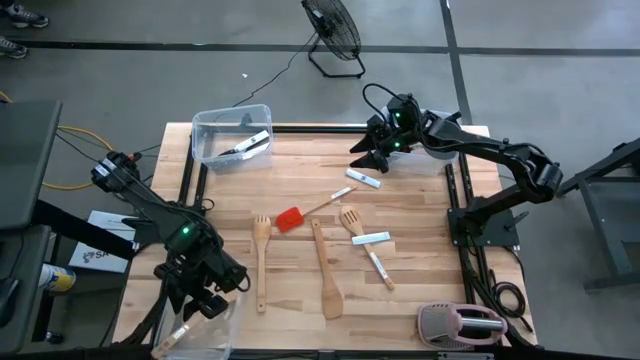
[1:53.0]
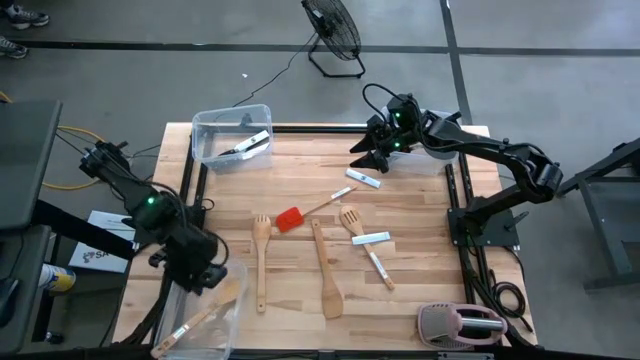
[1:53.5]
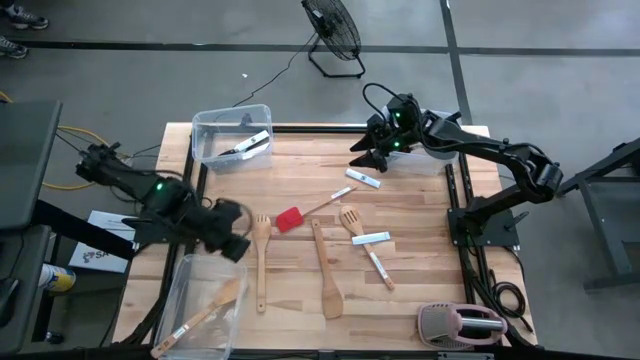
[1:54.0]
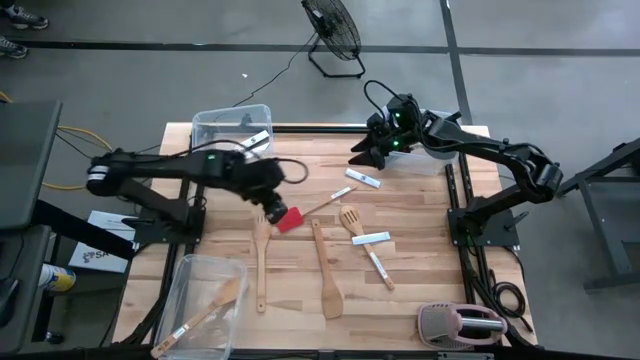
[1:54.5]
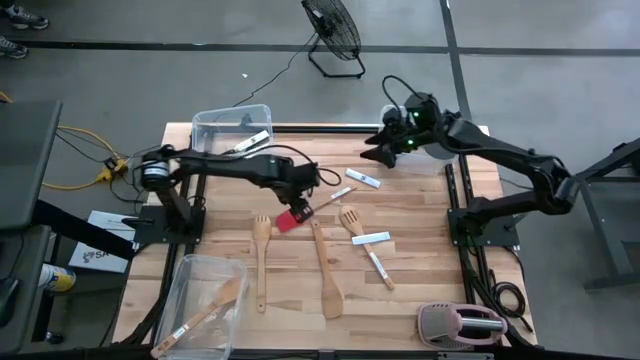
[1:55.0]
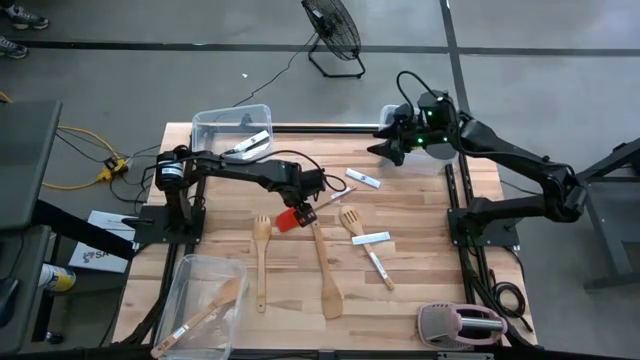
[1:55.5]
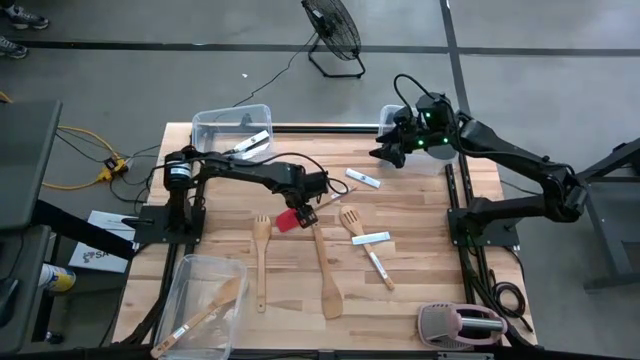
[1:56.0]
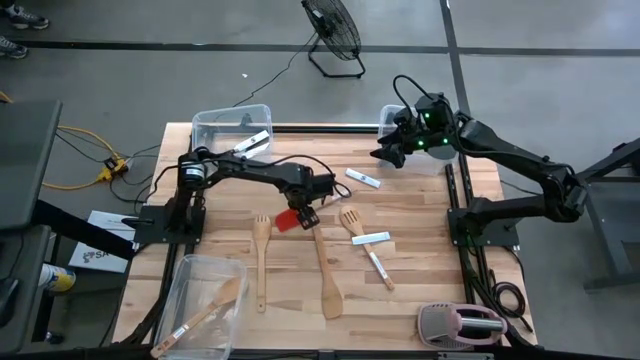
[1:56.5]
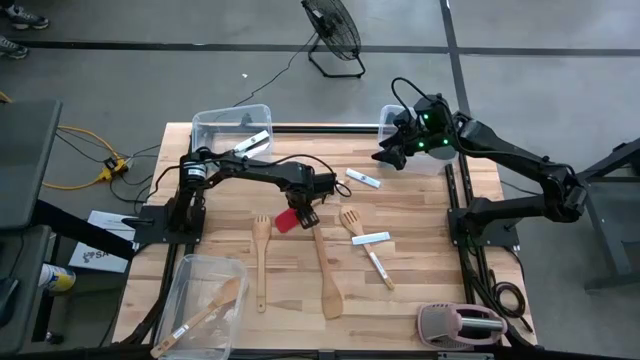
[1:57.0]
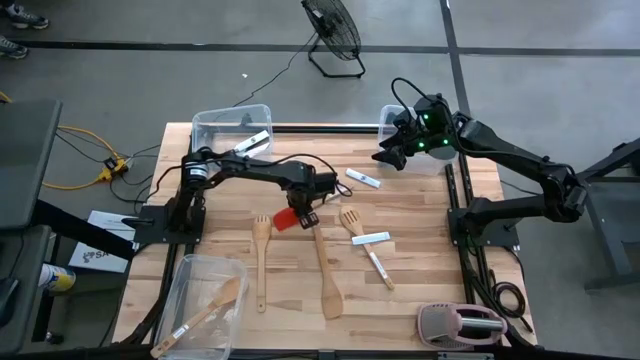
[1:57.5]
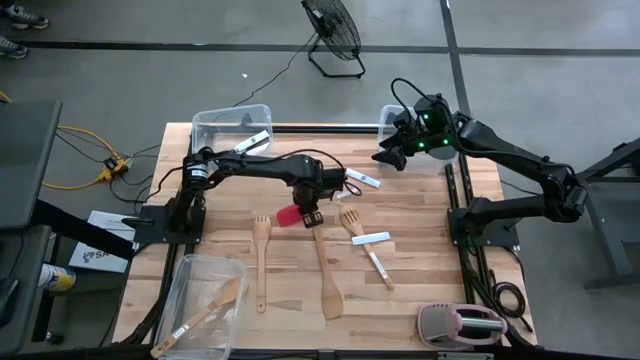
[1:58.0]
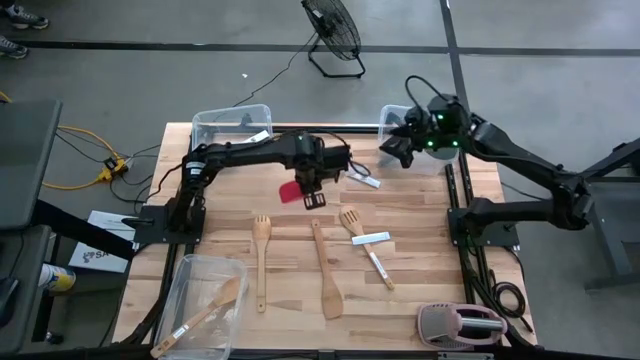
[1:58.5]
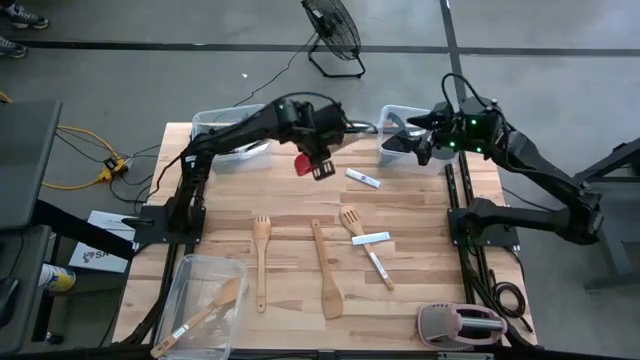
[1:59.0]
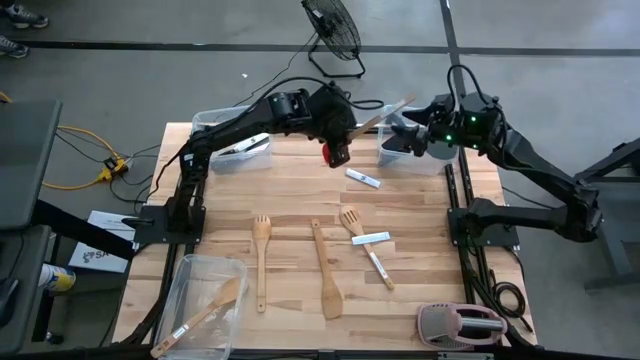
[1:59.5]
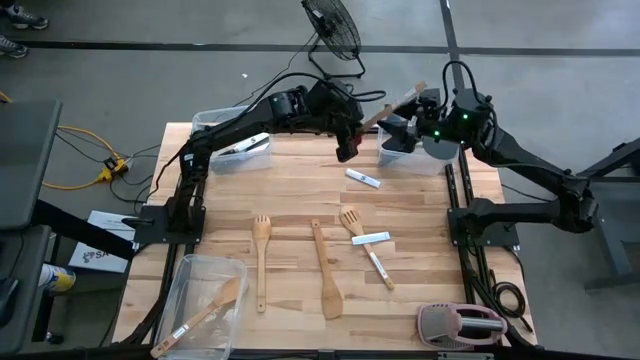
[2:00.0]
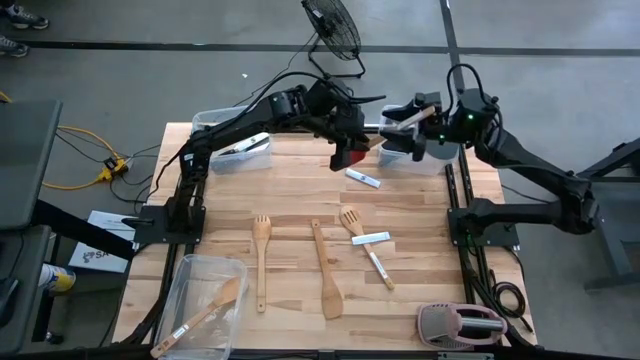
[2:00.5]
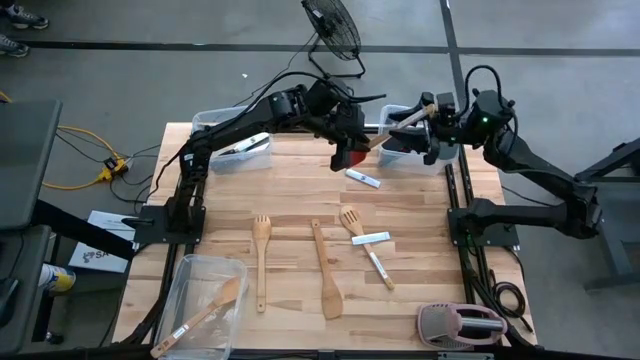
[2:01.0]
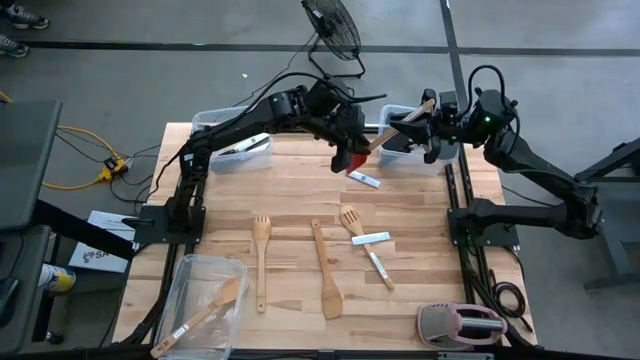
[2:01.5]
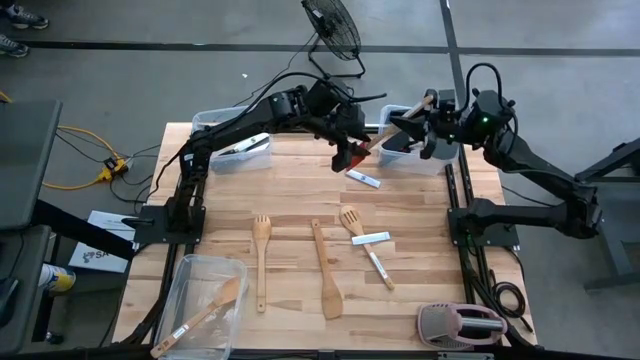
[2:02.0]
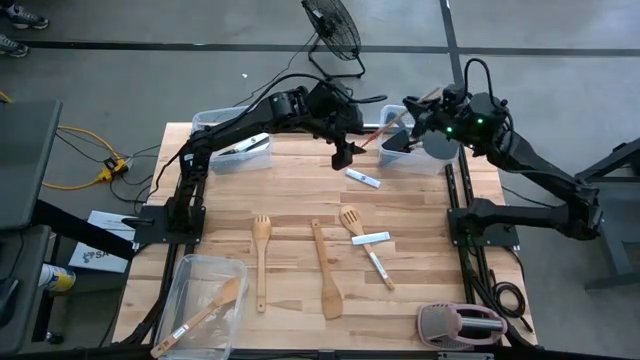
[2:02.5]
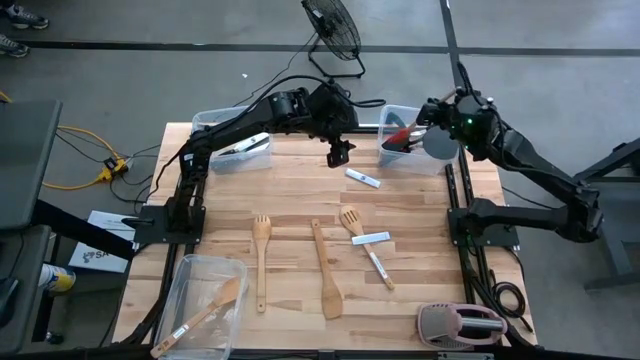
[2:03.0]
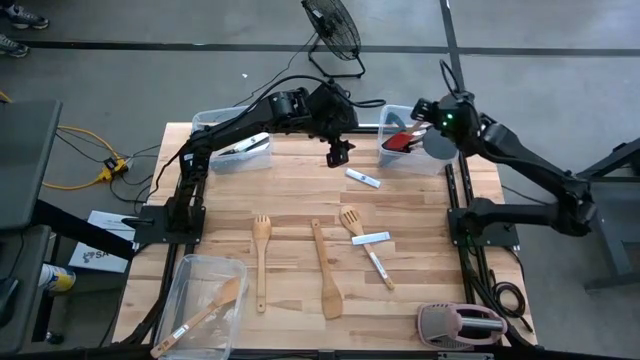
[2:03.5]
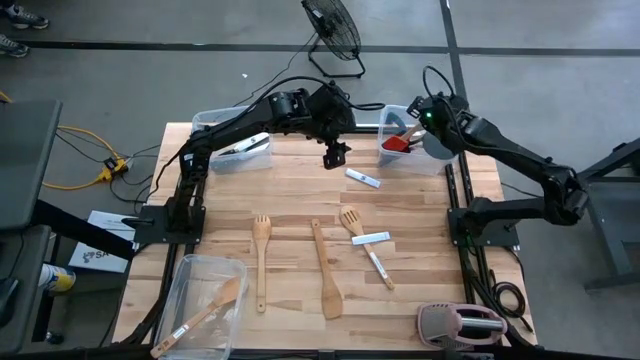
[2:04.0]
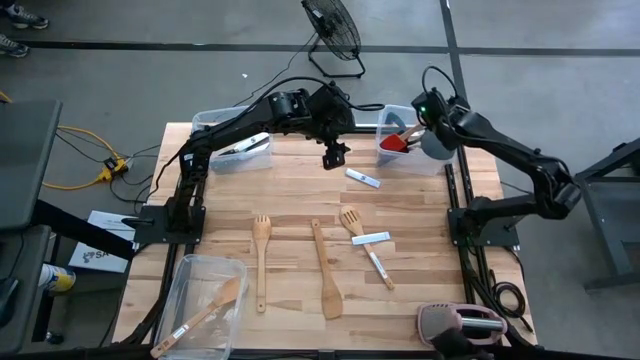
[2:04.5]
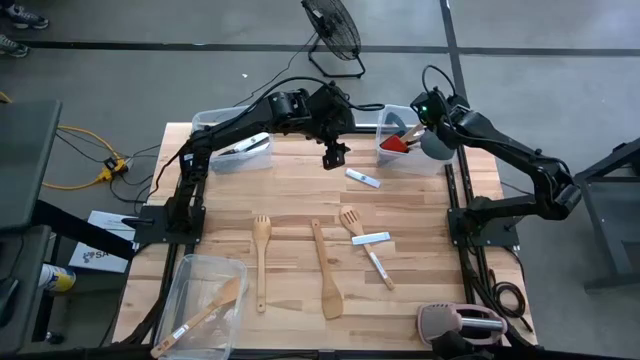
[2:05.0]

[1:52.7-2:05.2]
Task: Pick & Place Kitchen Items
Put the red spatula into the top right transparent bin

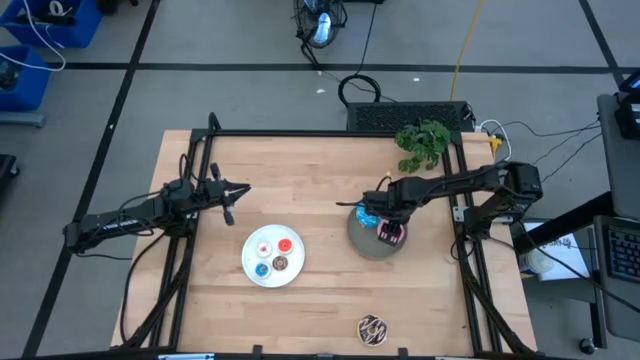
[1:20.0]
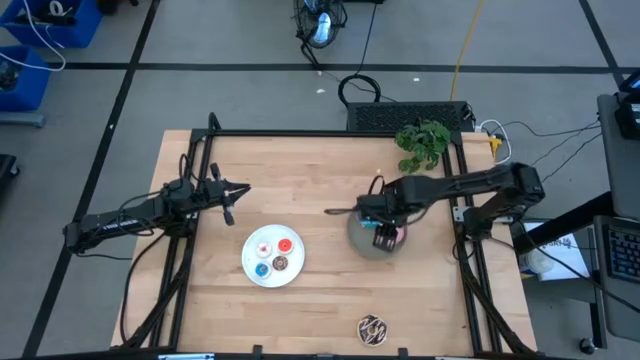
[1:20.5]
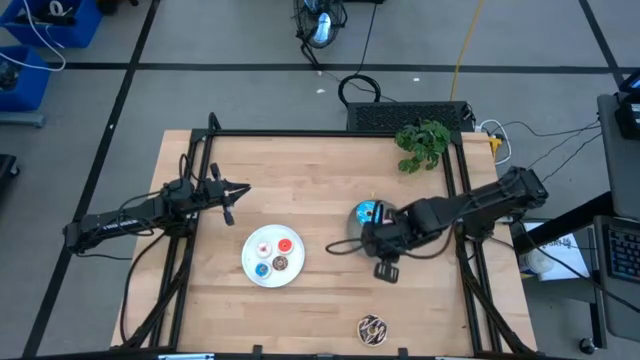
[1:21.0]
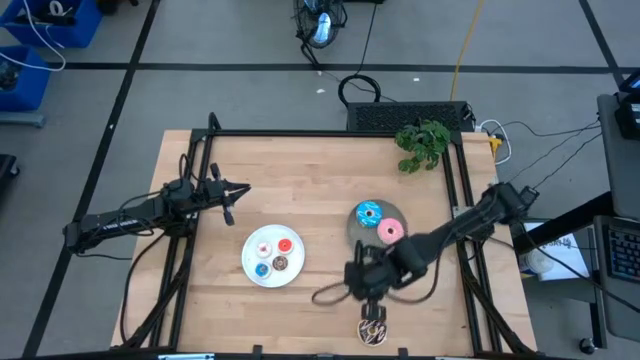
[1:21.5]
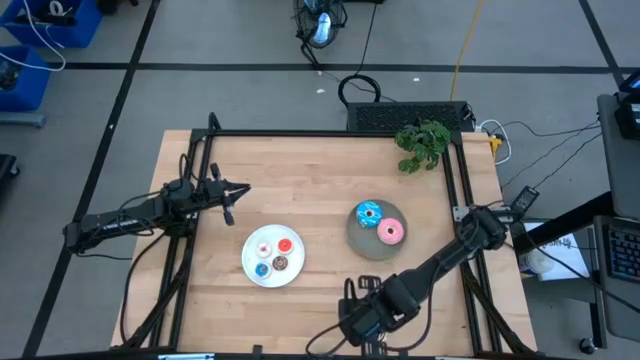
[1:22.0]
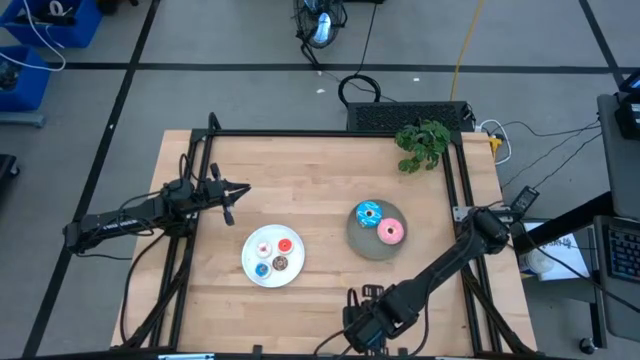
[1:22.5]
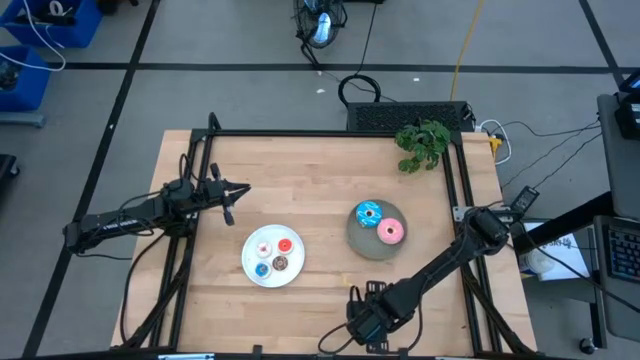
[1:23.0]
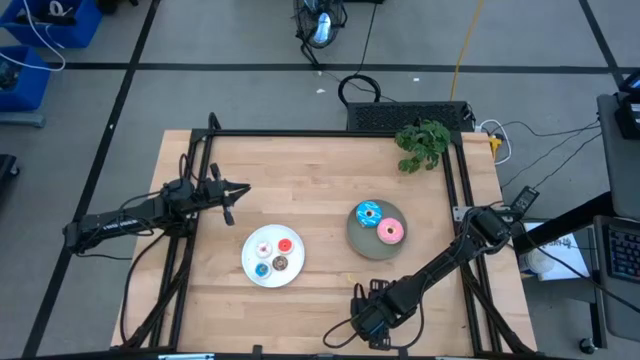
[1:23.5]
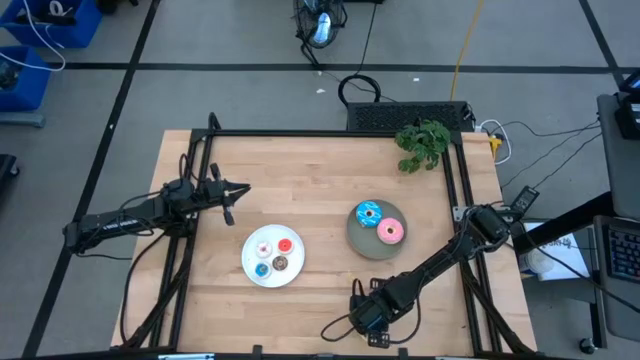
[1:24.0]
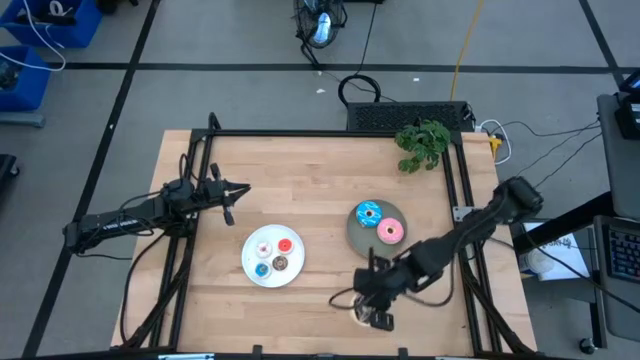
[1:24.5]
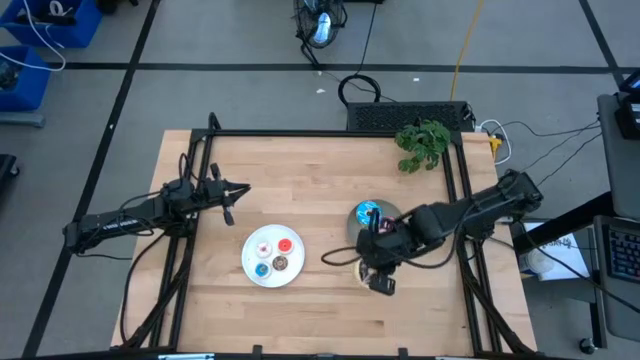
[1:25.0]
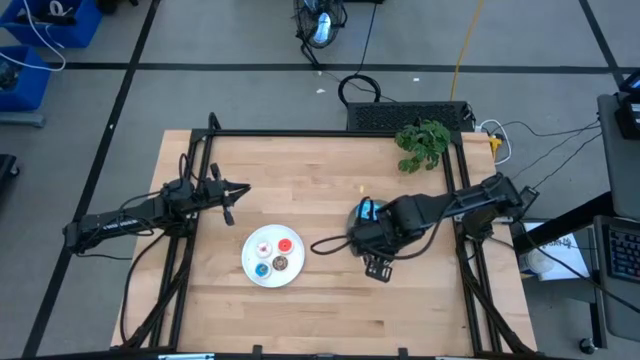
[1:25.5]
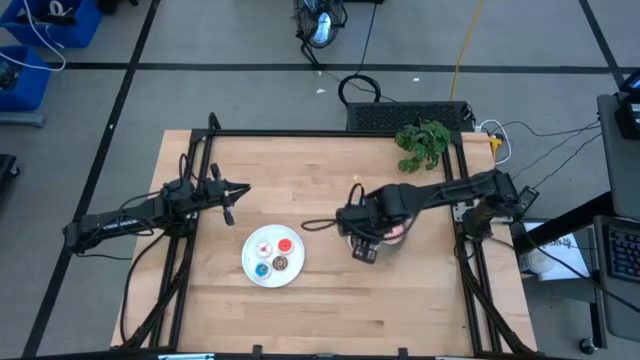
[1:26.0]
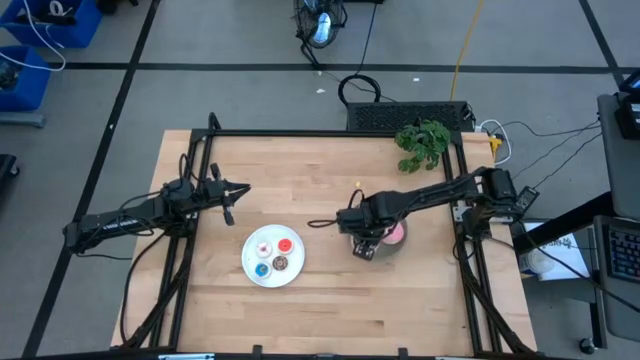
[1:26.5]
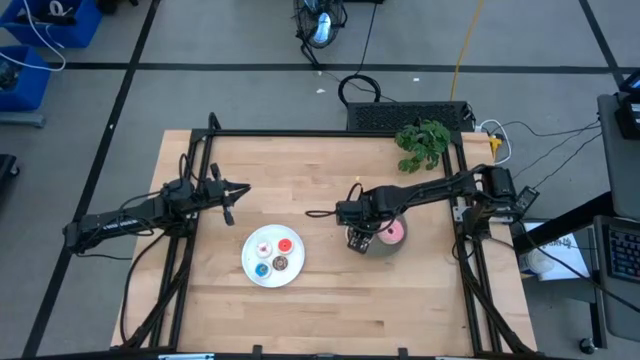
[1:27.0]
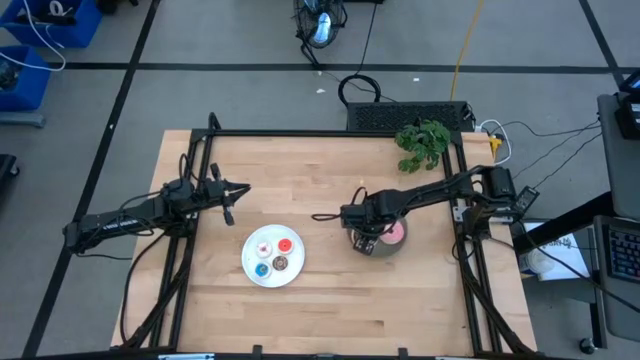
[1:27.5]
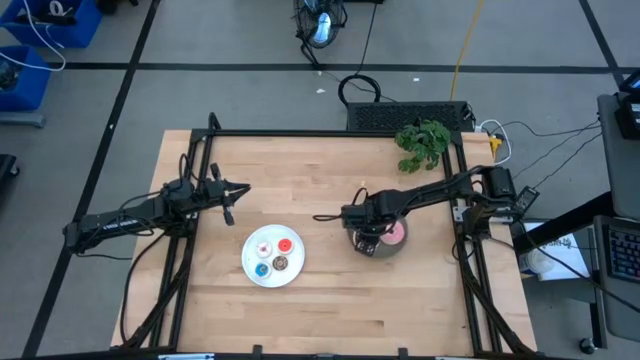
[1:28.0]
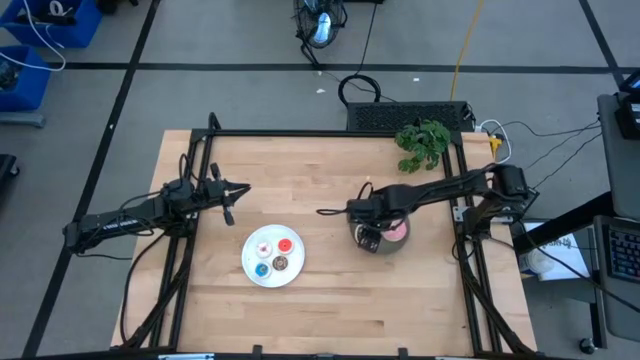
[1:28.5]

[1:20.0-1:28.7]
Task: Pick & Place donuts
Put the big black donut on the gray plate
